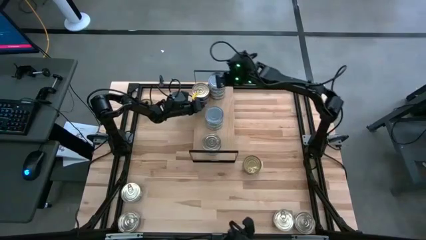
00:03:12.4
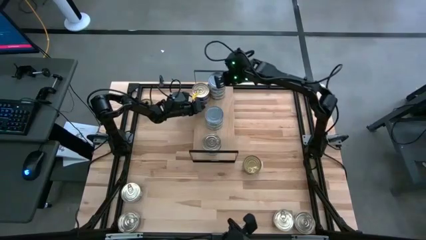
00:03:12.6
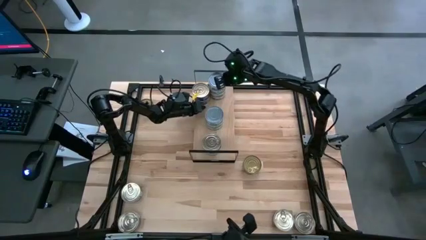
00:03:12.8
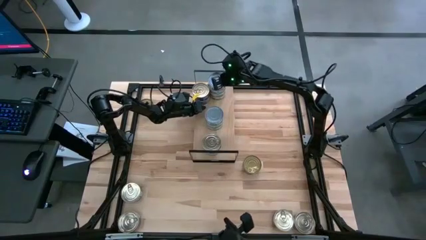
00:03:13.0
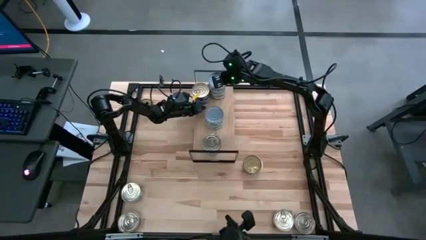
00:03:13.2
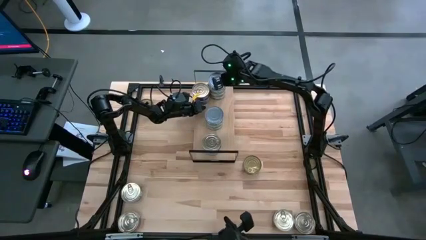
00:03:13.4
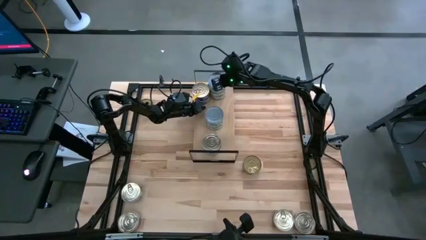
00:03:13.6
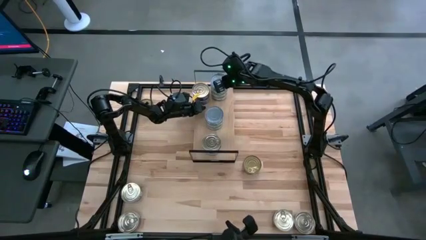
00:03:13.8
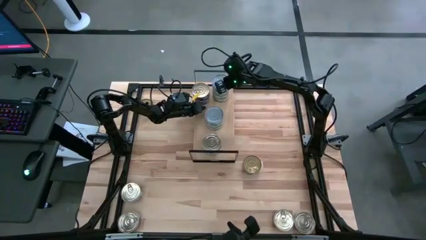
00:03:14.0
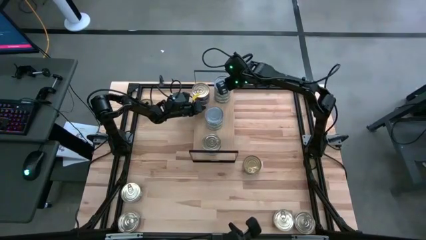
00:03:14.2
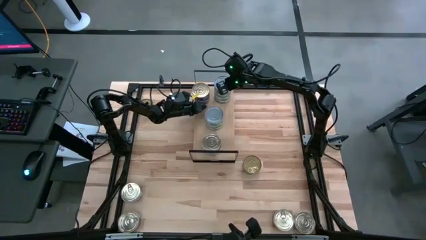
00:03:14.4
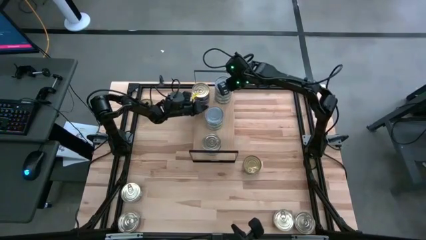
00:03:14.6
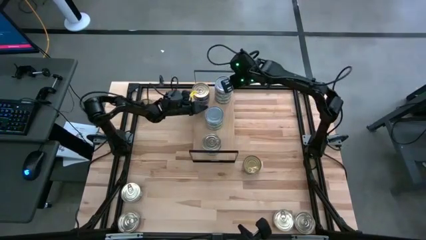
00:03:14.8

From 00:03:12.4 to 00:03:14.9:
Task: Stack canned seafood by type on shelf
Adjust the green tuna can

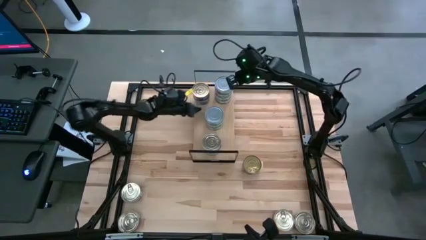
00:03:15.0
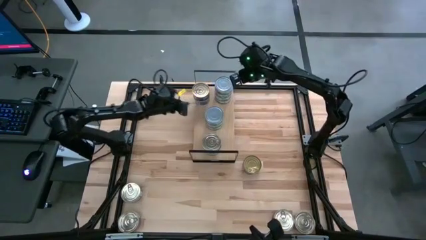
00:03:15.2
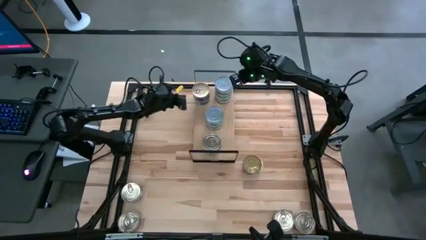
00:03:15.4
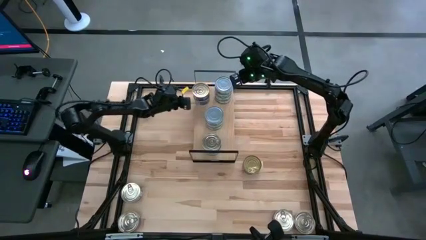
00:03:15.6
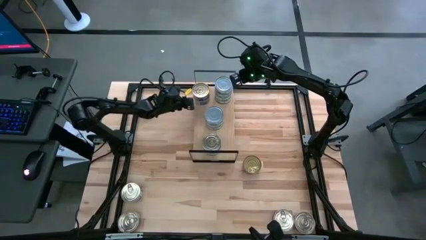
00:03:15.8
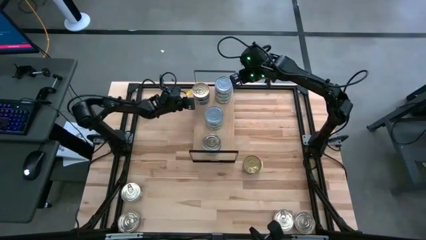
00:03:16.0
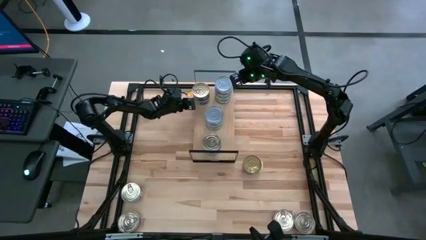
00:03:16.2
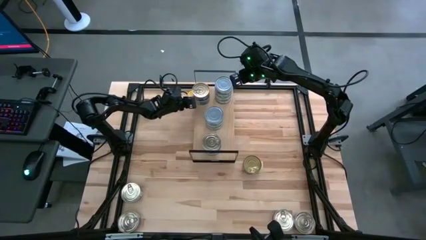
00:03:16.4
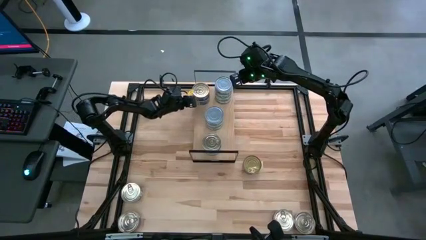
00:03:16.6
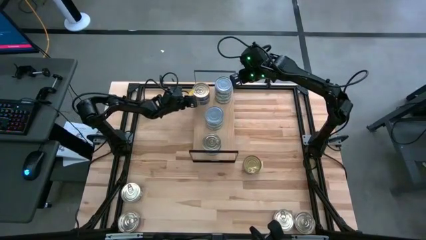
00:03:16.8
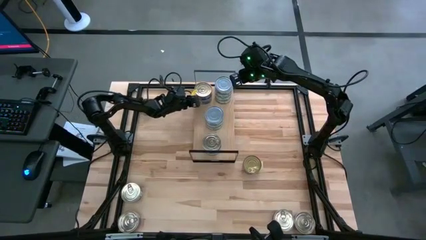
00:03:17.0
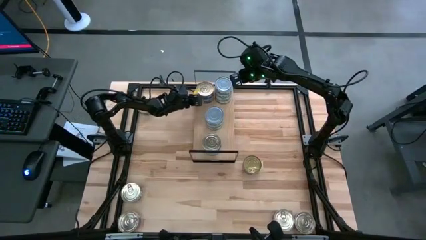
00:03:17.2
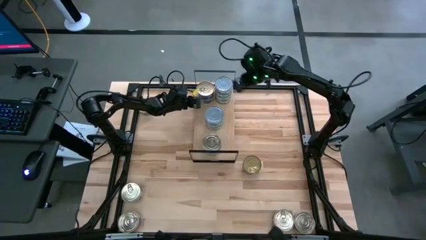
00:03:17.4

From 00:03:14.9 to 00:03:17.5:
Adjust the pink and blue tuna can

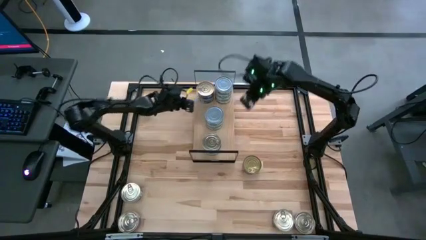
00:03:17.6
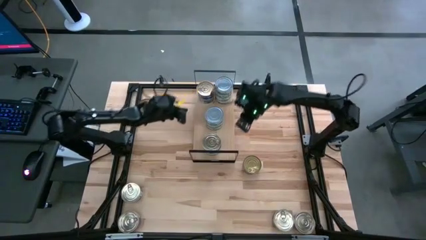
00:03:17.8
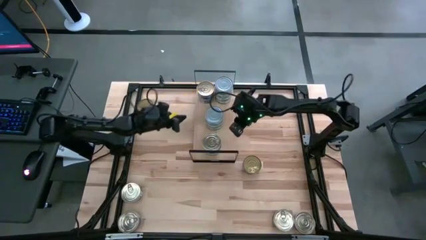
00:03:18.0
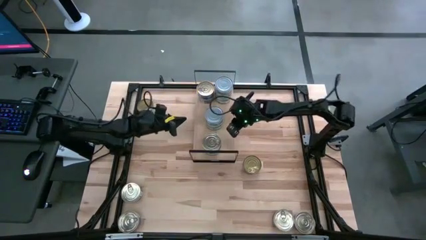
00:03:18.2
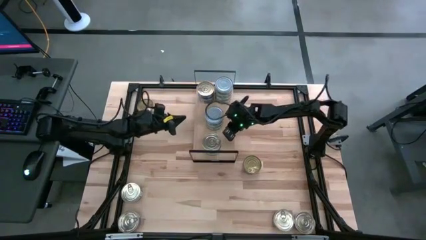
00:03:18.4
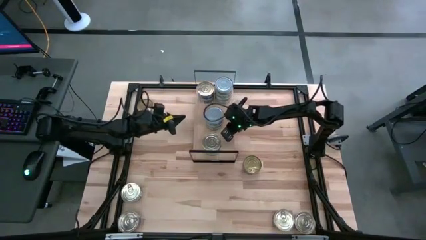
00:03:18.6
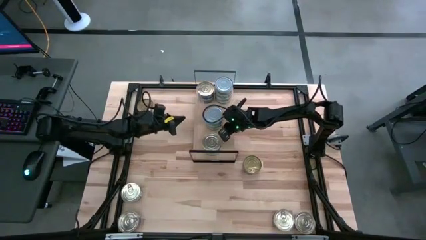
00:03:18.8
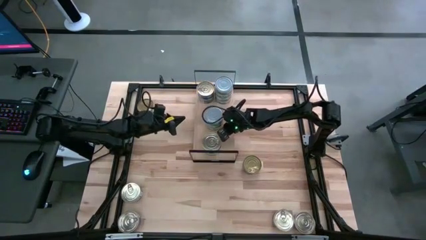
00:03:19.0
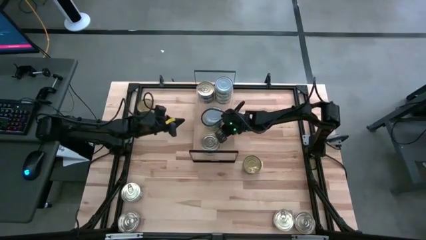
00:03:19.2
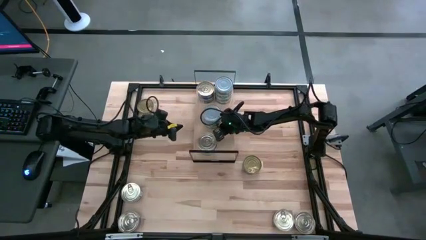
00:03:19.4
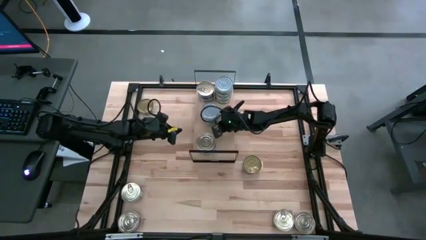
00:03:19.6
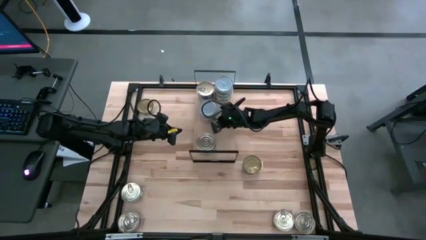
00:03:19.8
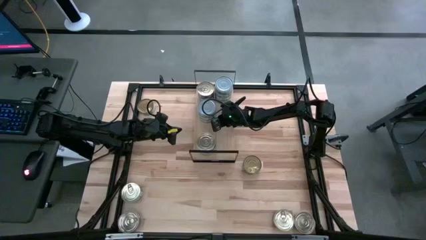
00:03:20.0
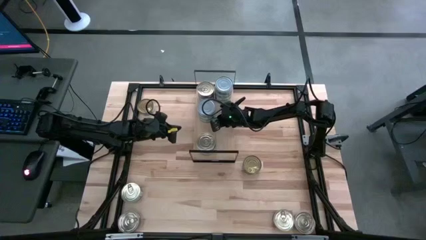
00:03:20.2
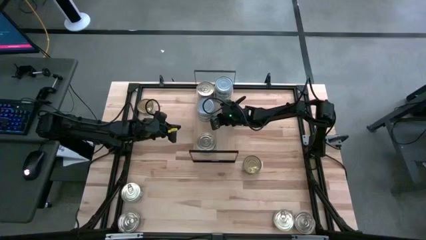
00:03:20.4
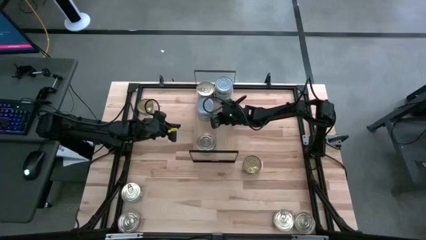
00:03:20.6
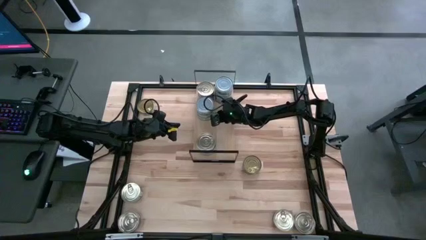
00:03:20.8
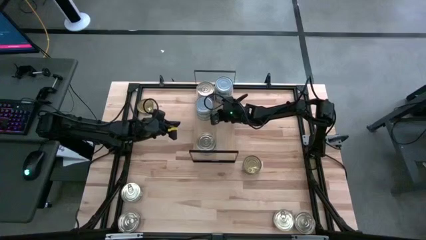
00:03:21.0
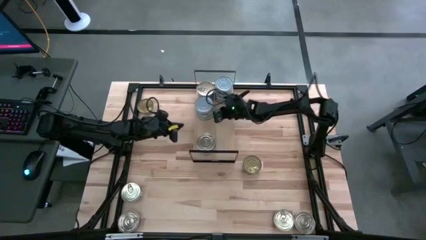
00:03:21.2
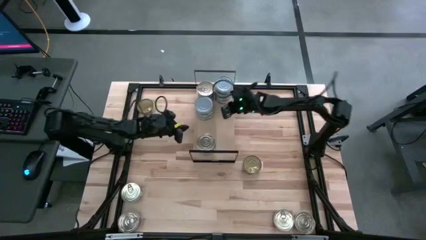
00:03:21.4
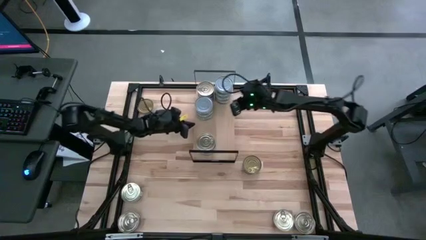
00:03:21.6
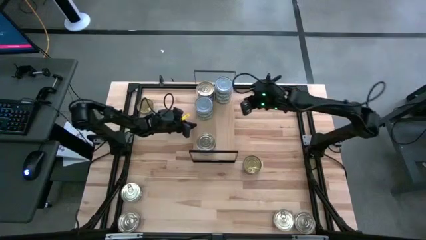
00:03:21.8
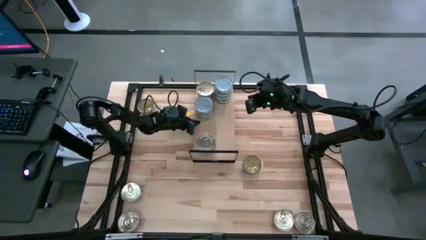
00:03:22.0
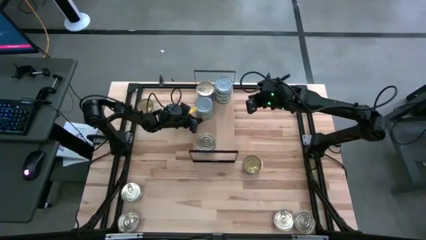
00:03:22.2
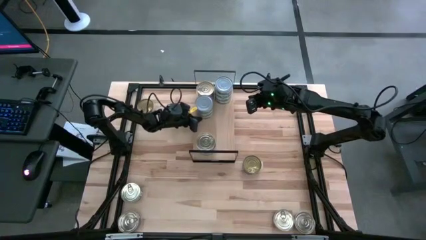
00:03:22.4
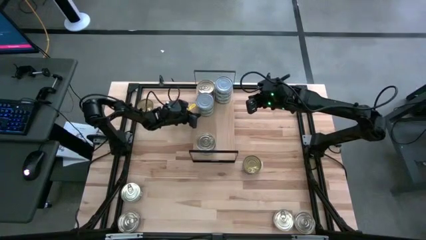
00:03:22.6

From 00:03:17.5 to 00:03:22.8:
Adjust the green tuna can

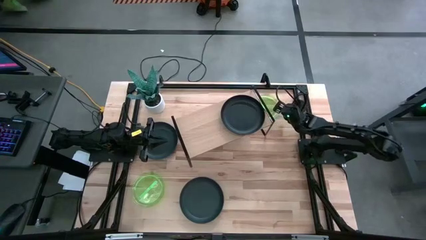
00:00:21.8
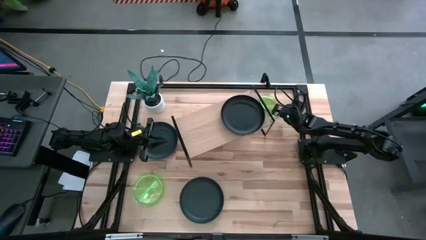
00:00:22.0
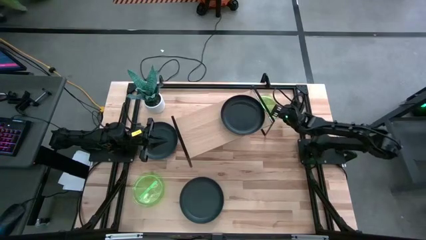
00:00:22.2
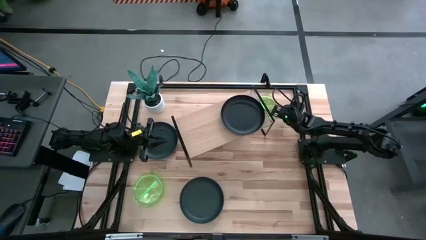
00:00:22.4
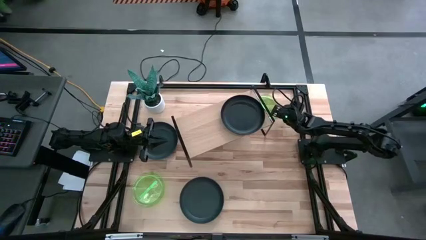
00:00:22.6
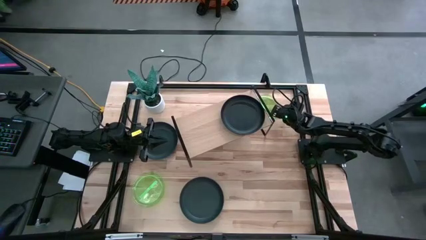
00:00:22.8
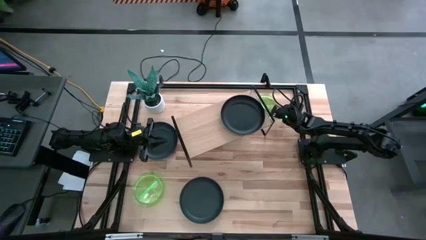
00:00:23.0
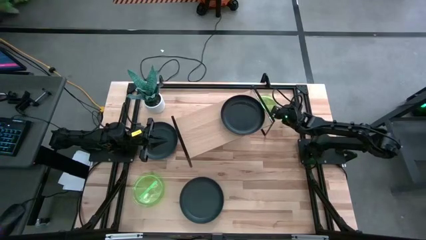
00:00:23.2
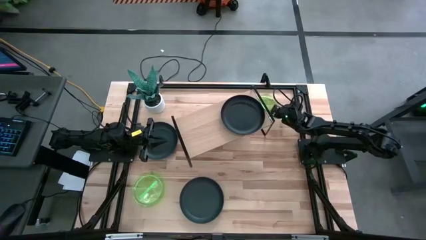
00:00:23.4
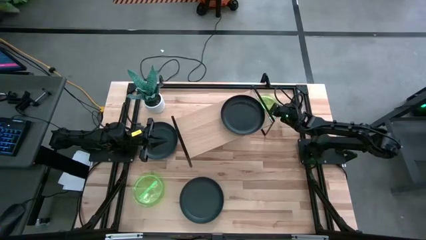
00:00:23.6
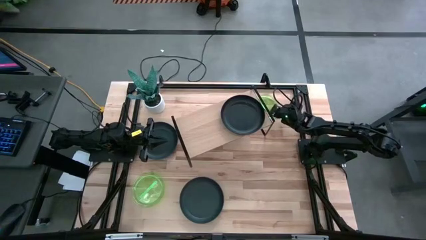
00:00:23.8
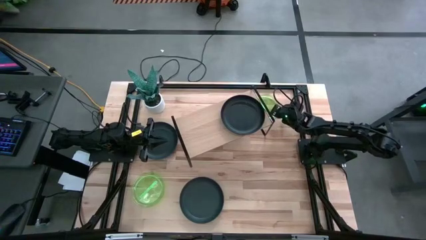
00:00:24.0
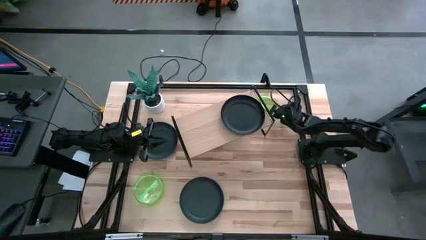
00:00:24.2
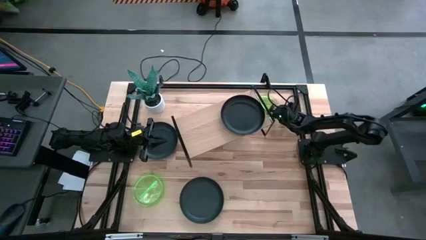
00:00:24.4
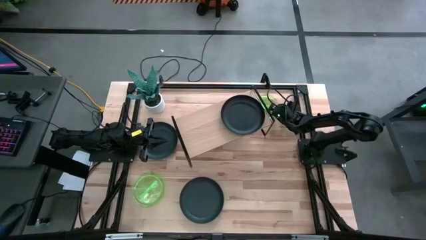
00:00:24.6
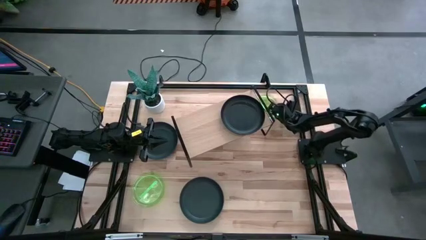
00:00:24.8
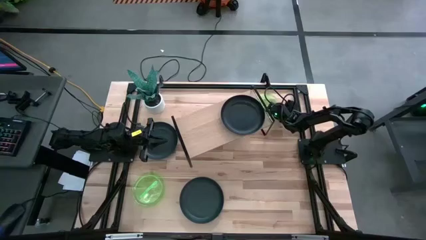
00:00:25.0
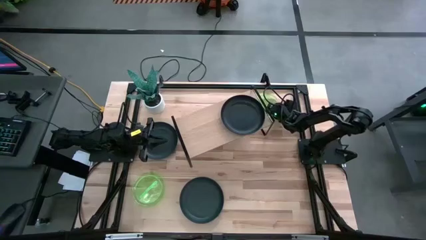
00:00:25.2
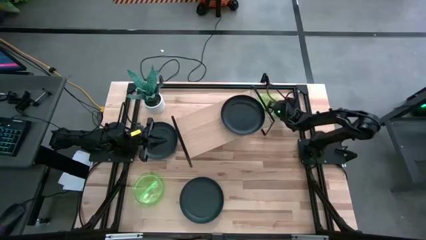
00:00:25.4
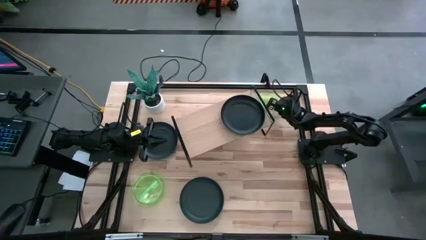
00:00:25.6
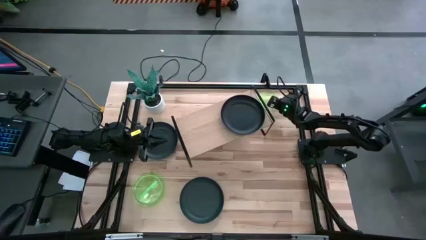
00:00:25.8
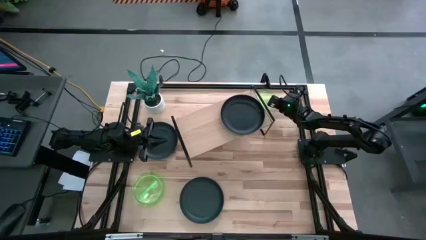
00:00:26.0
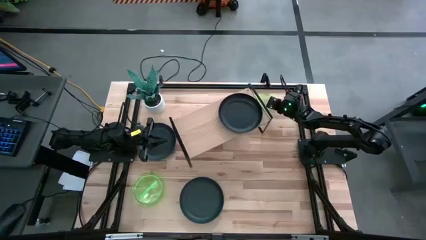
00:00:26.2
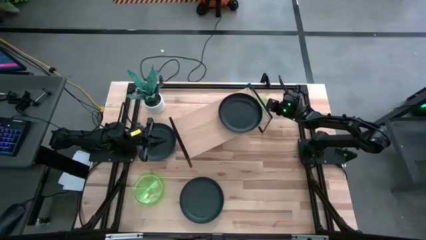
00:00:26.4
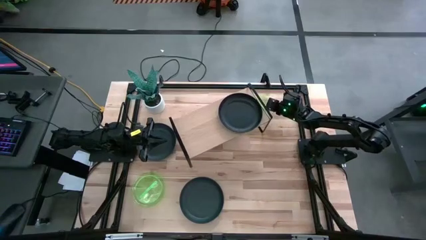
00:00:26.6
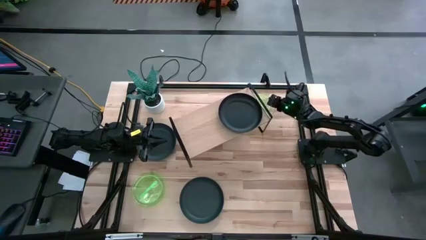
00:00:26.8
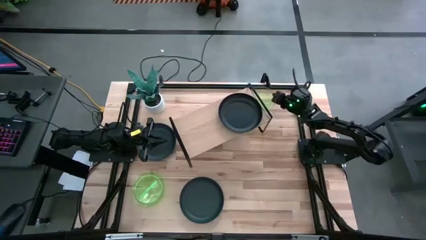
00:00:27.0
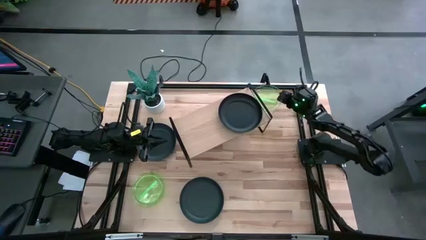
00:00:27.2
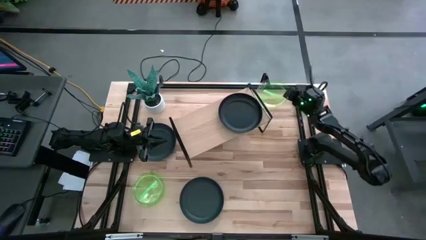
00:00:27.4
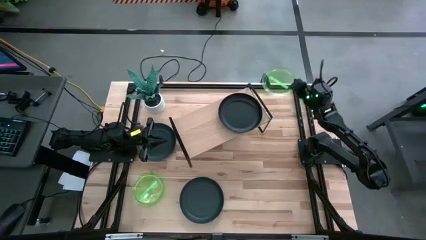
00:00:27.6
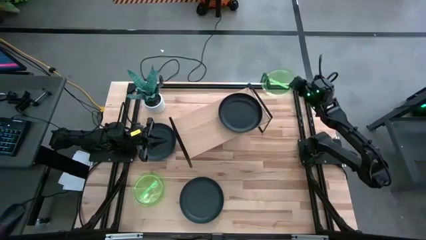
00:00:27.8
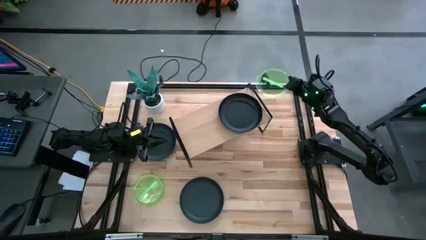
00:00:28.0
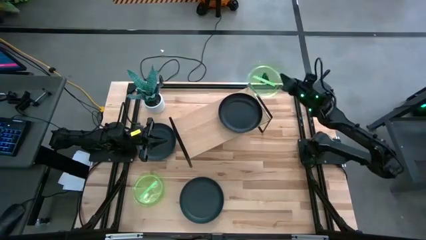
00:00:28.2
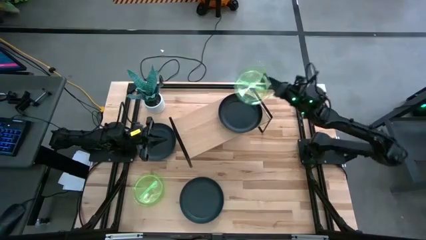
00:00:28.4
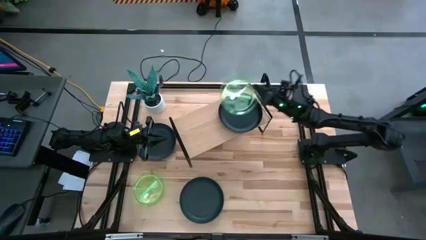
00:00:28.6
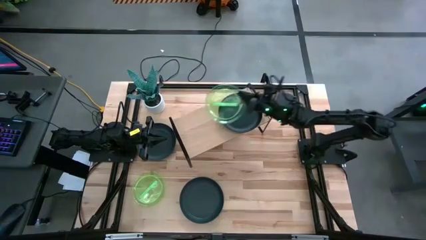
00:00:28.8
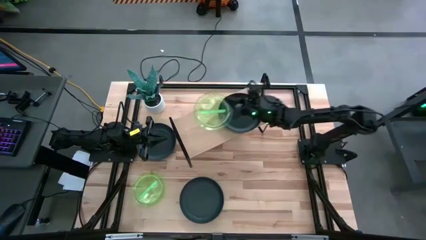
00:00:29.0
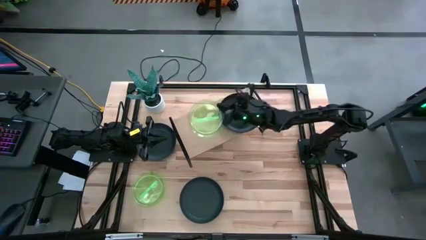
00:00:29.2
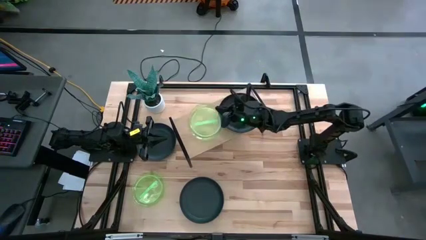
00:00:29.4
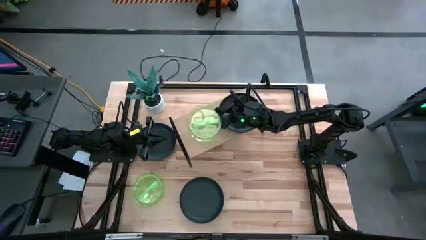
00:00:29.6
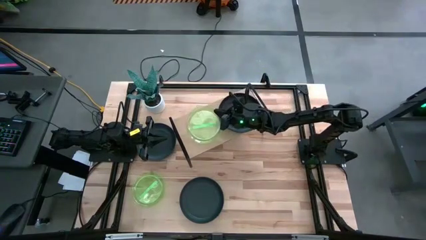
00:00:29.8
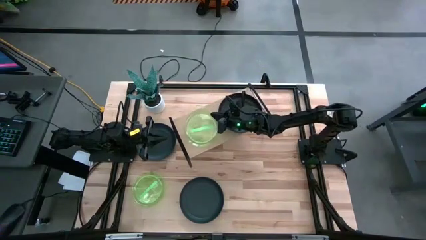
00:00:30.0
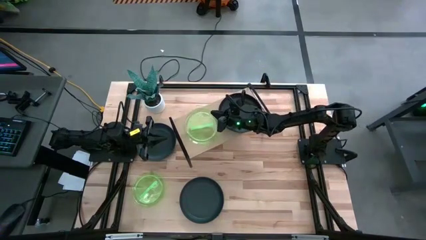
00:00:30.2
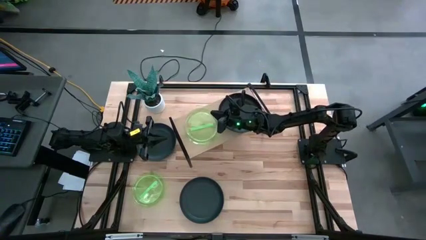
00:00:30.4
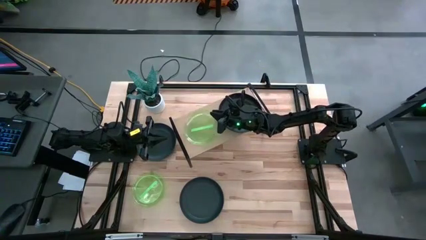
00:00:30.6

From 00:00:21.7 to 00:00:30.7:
Task: Place and stack plates onto a shelf
Put the top right green plate on the shelf
